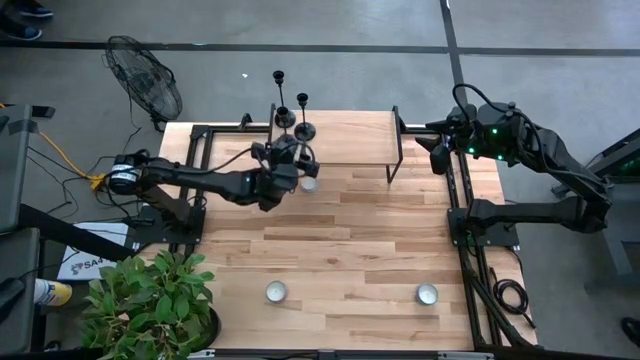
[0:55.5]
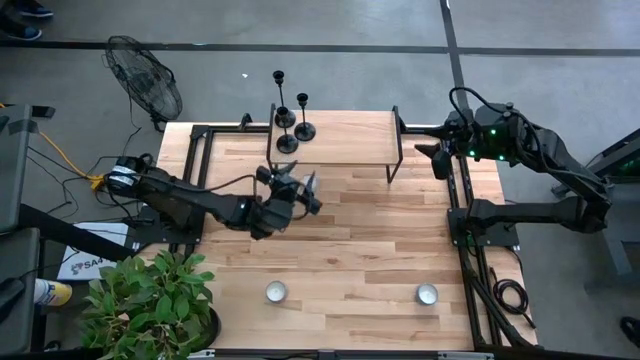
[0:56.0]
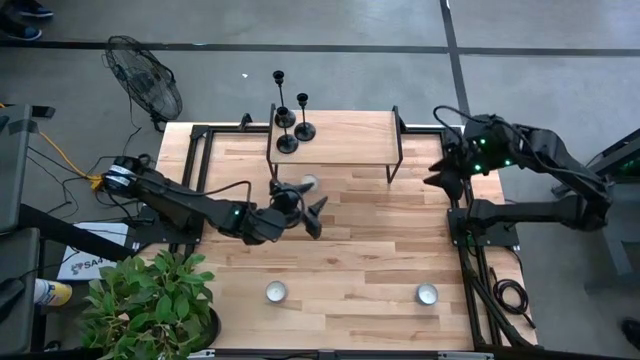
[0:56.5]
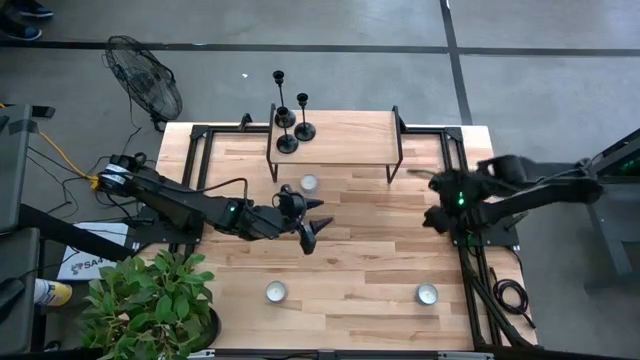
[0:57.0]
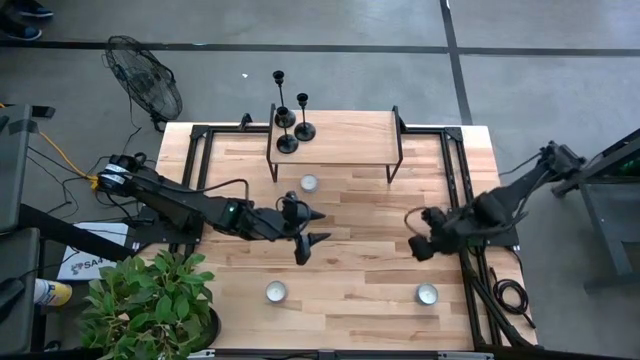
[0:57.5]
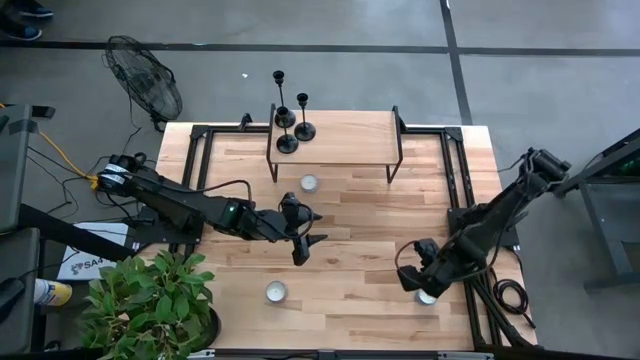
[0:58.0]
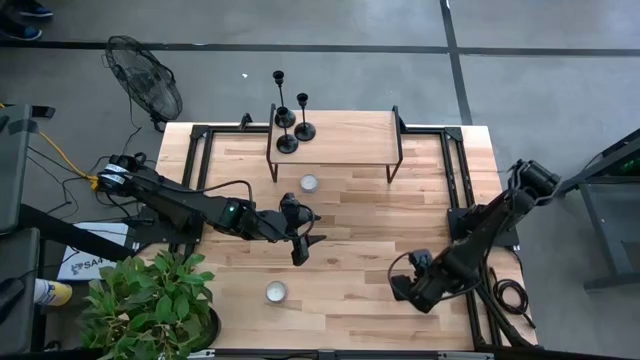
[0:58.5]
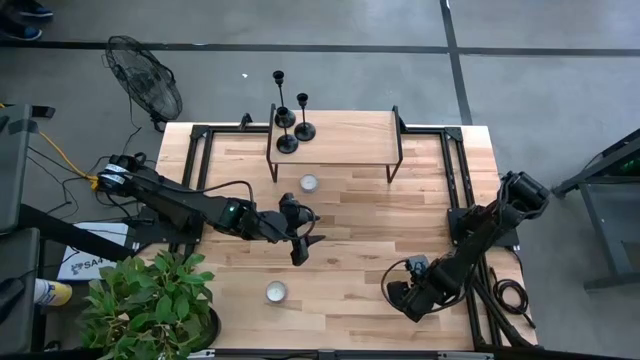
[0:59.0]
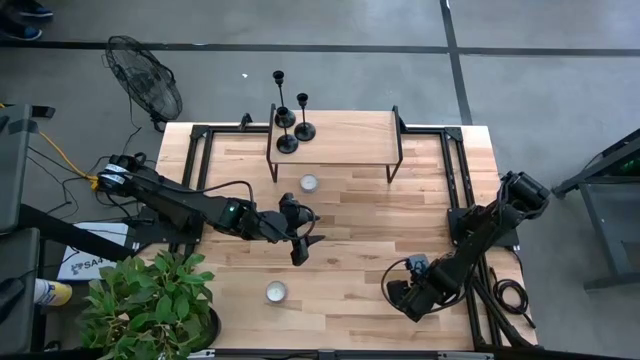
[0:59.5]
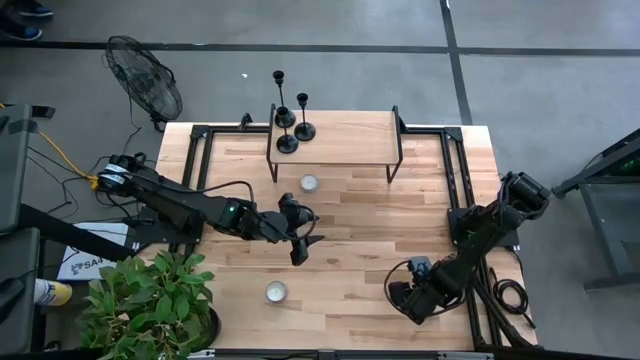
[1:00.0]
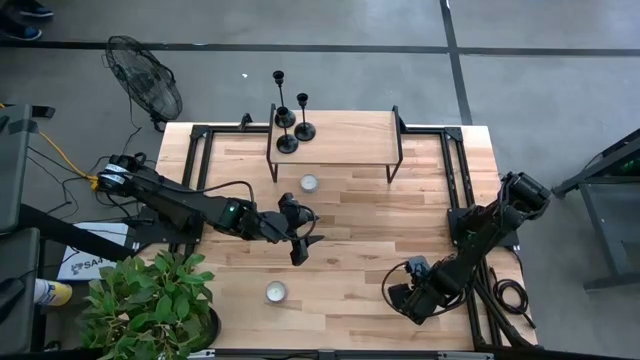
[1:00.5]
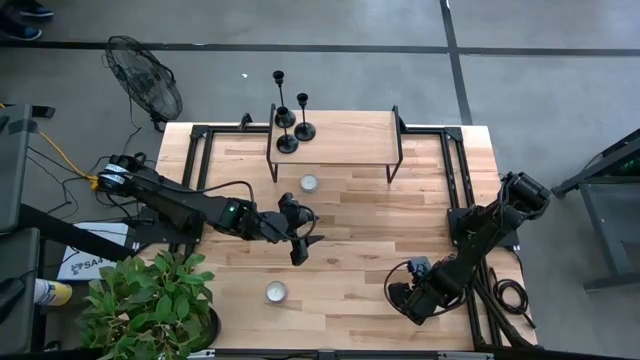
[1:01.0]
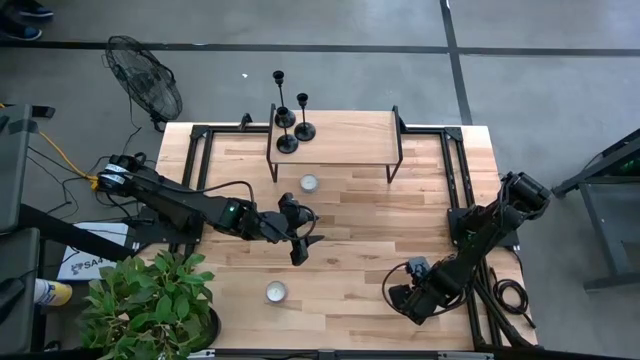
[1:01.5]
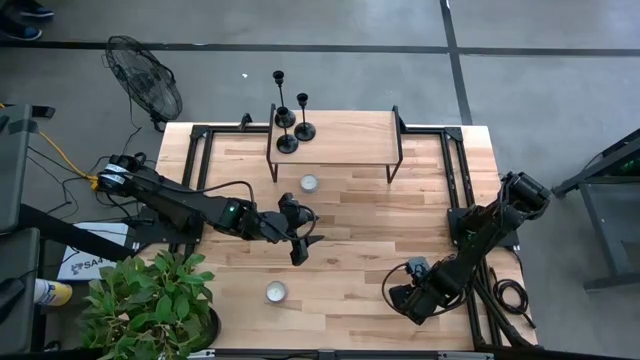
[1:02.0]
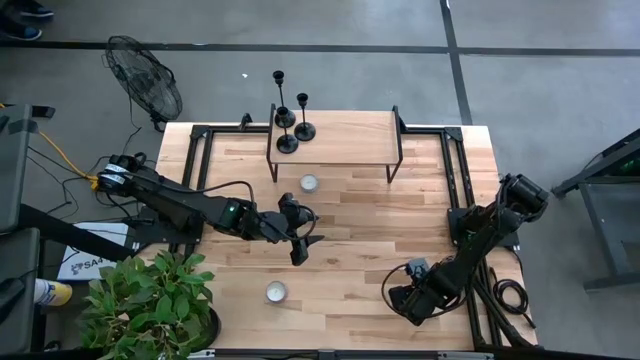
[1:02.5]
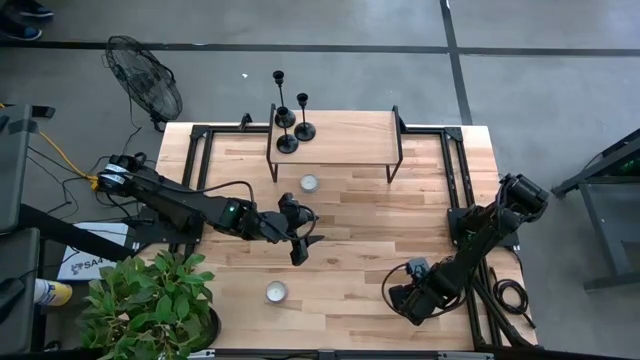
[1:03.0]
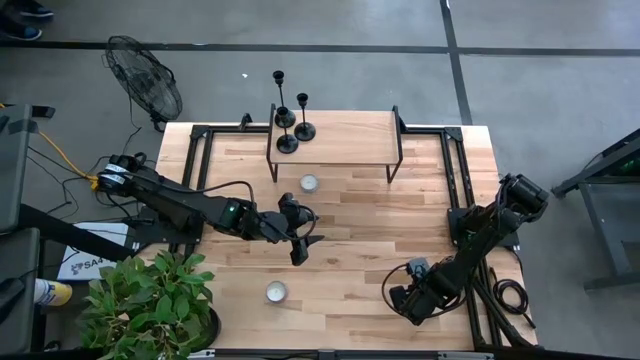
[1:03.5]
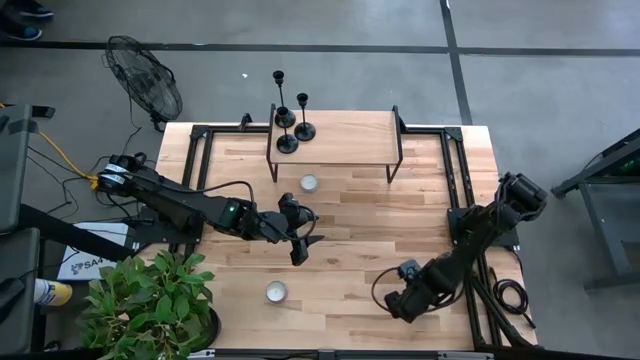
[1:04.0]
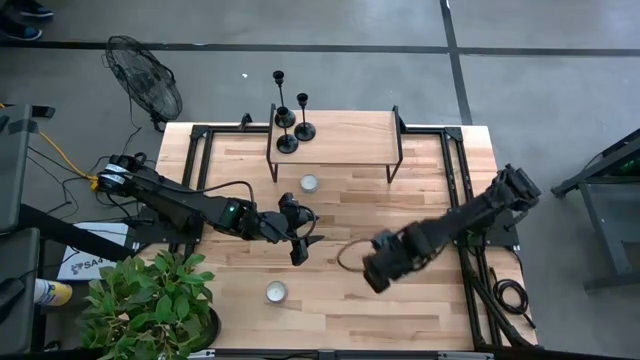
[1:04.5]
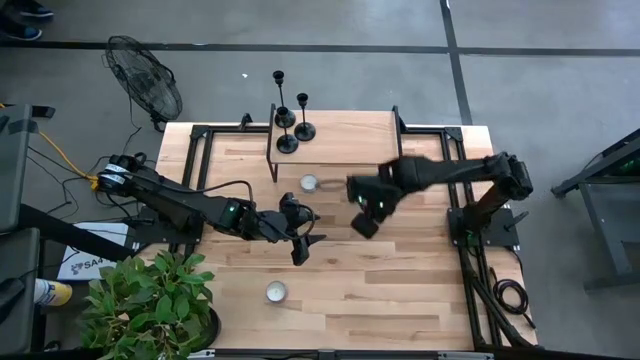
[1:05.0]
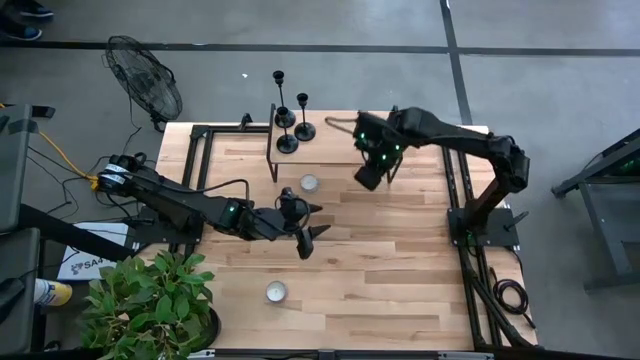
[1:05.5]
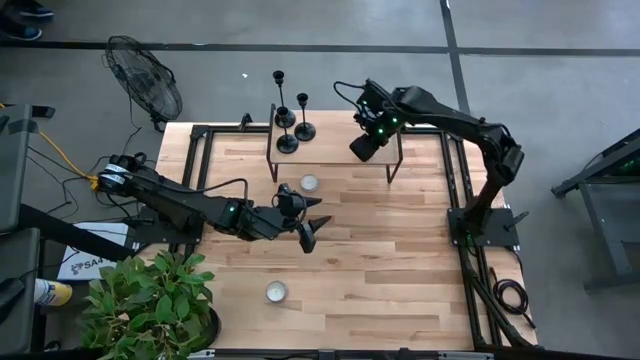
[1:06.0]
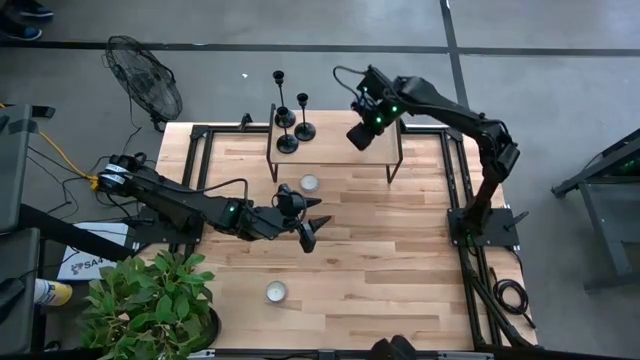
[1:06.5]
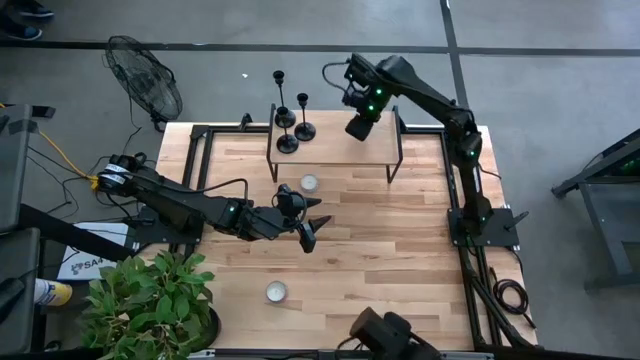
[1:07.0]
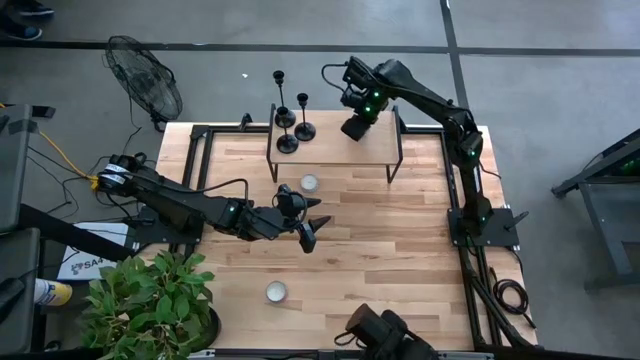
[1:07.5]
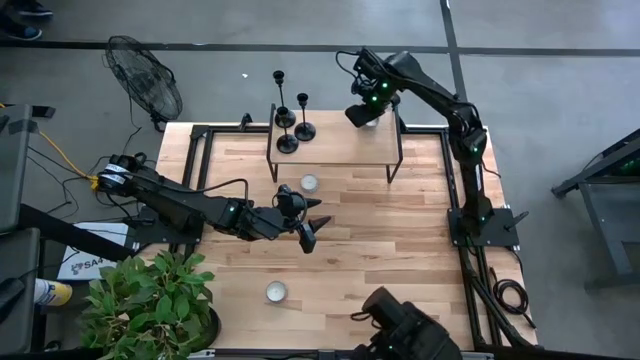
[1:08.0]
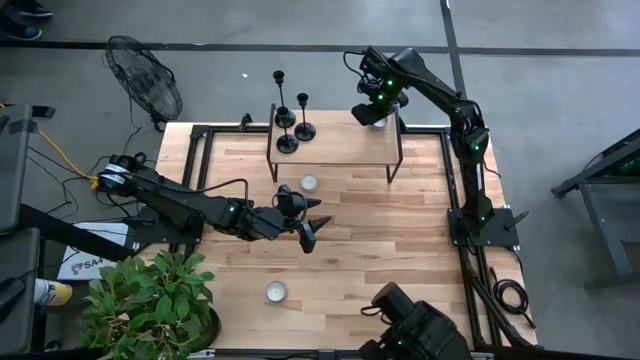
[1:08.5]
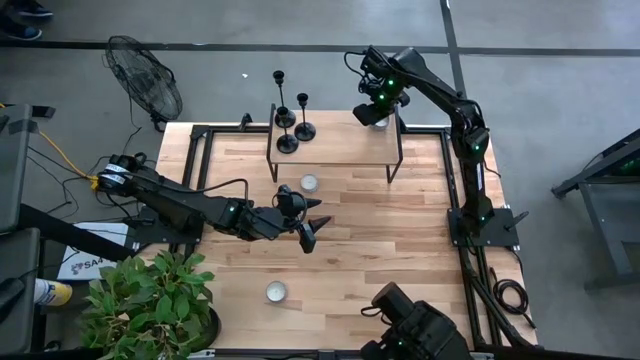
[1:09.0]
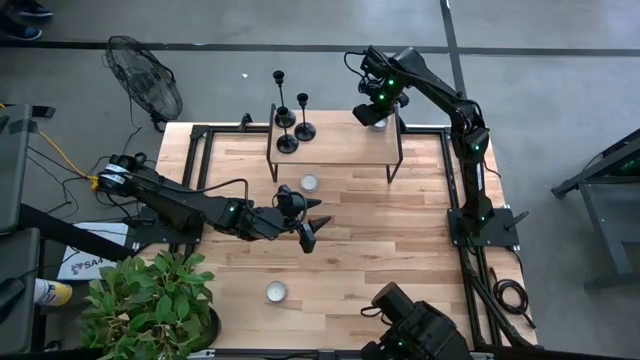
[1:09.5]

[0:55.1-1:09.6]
Task: Pick & Place candle stick holders
Put the blue scented candle on the shelf

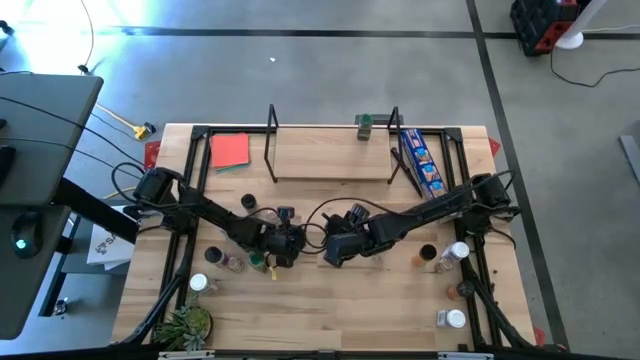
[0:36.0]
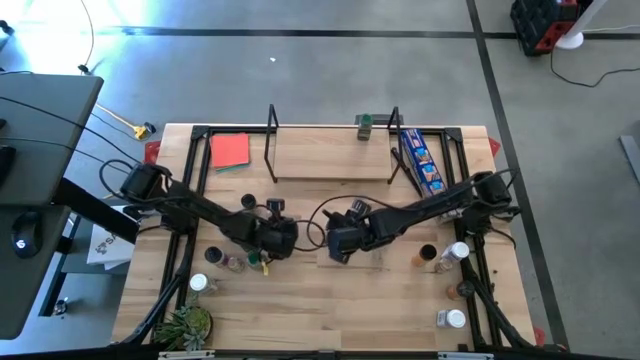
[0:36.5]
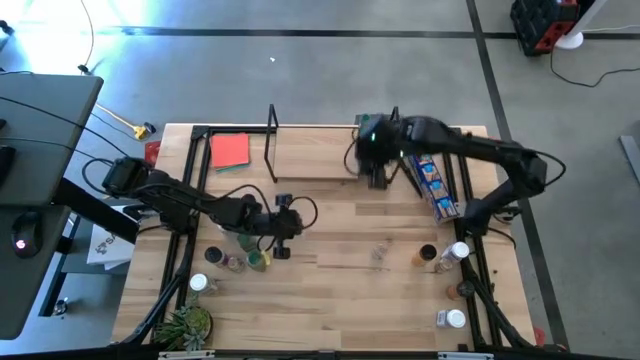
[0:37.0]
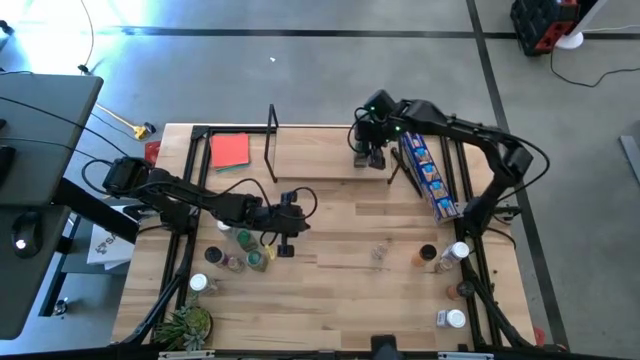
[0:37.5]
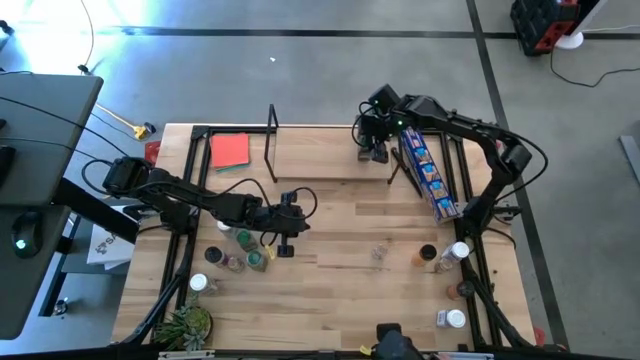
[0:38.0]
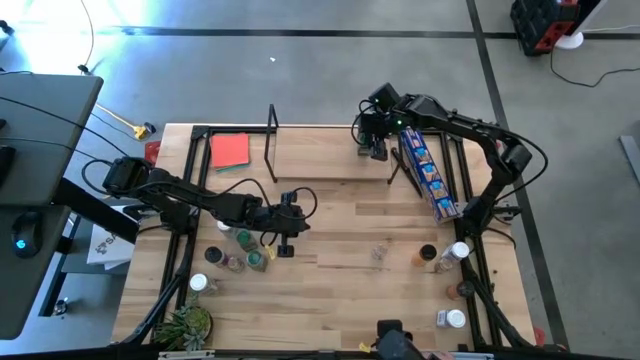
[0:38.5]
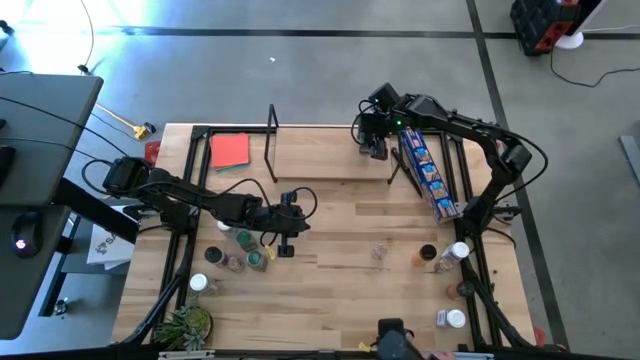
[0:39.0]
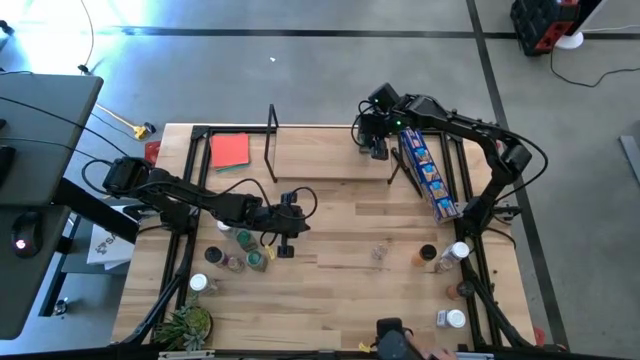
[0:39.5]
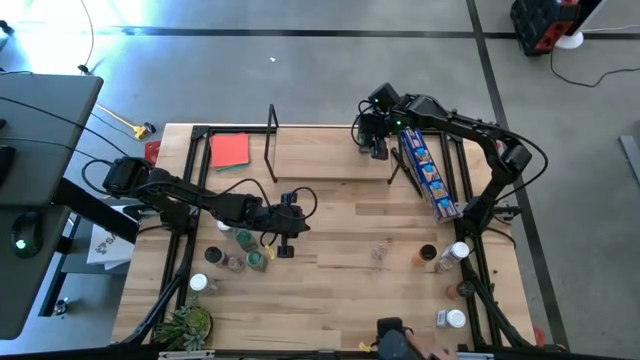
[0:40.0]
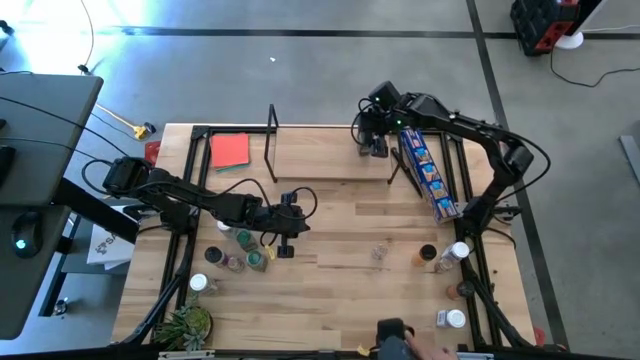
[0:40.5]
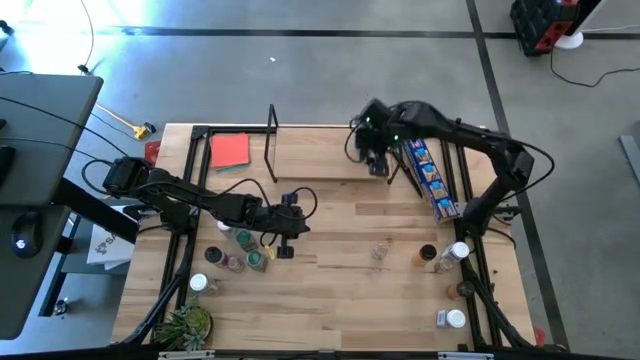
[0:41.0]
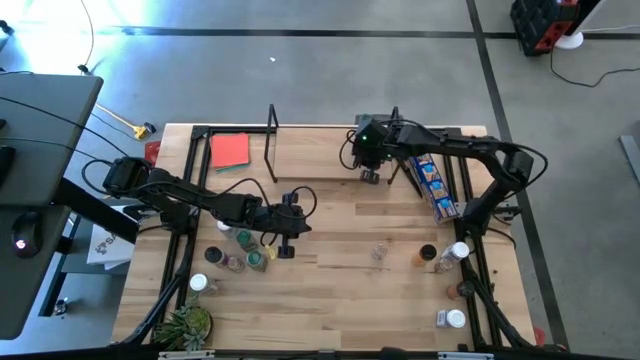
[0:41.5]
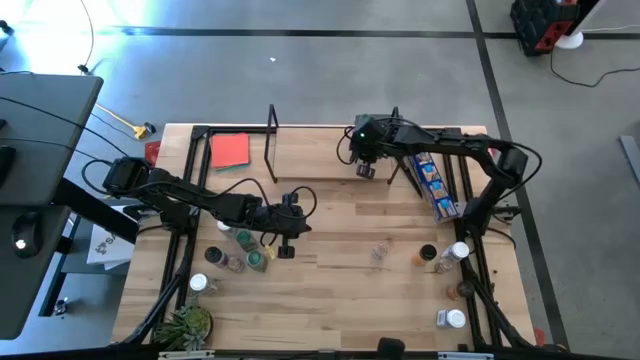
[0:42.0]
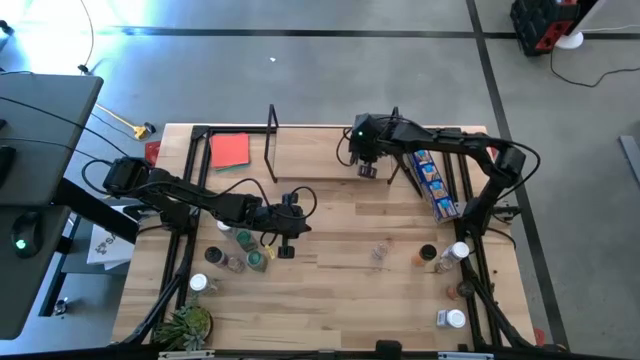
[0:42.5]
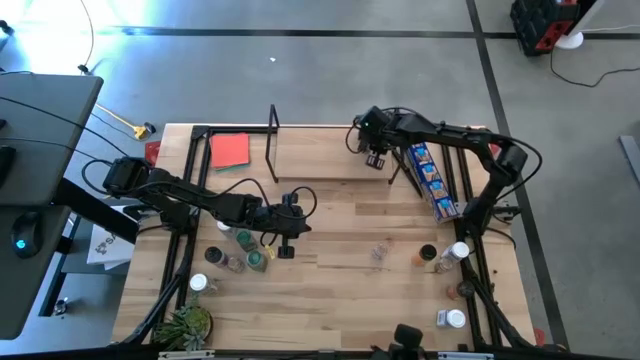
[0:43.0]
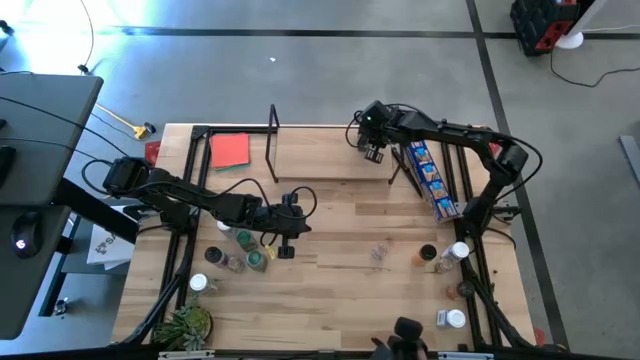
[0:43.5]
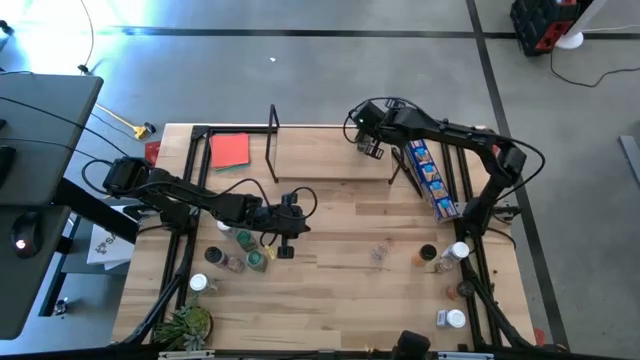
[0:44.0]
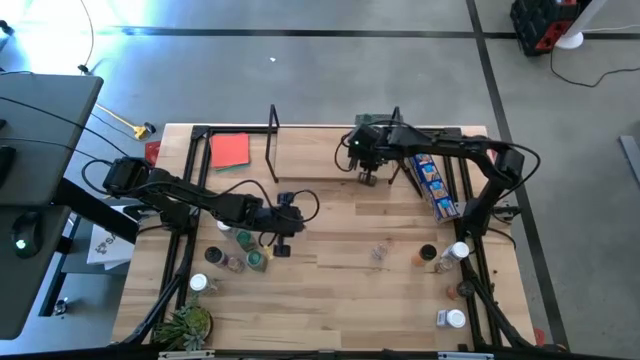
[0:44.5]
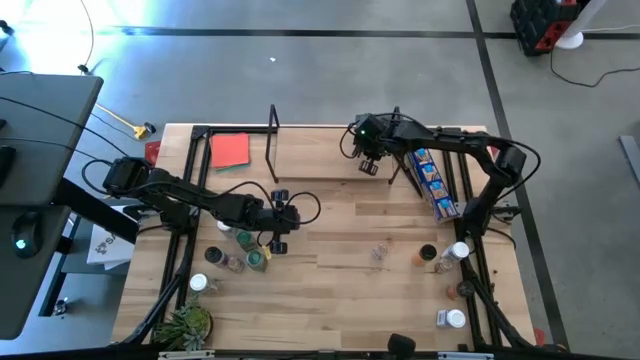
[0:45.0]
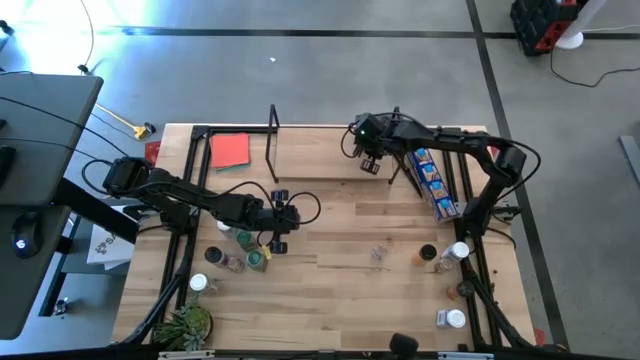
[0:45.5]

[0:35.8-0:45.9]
Task: Shelf spices
Put the green seasoning bottle on the shelf aligned with the other green seasoning bottle
